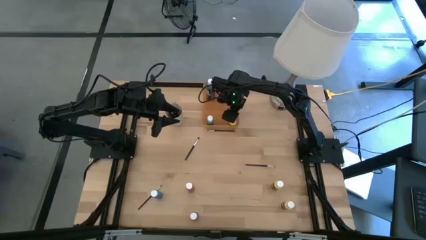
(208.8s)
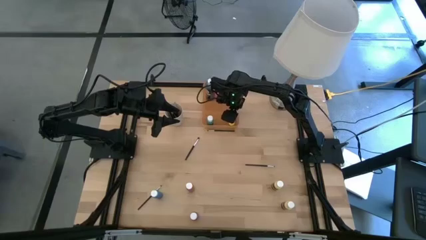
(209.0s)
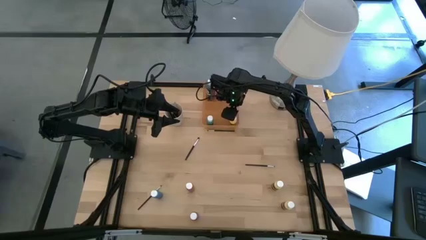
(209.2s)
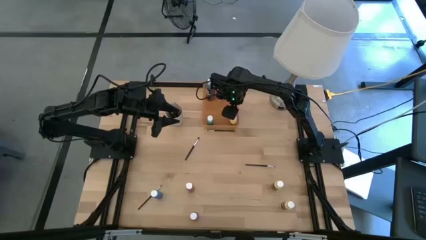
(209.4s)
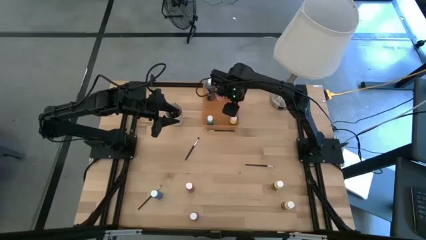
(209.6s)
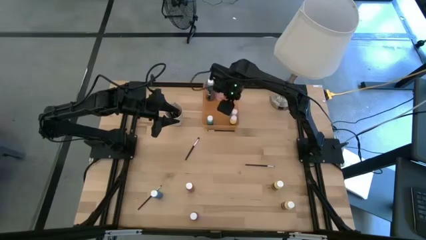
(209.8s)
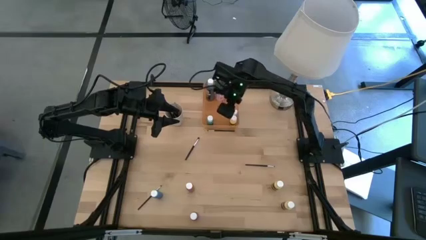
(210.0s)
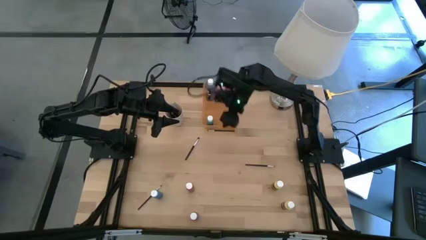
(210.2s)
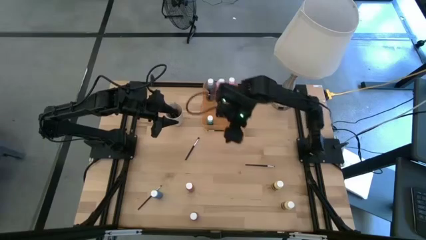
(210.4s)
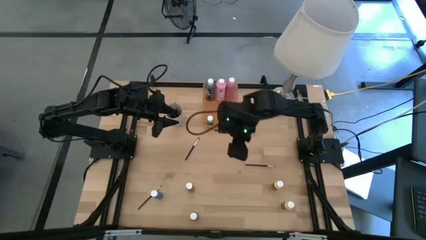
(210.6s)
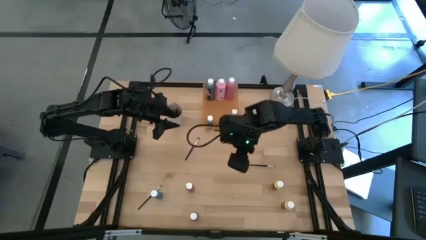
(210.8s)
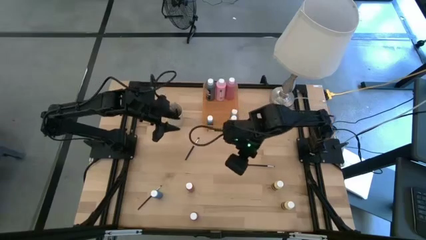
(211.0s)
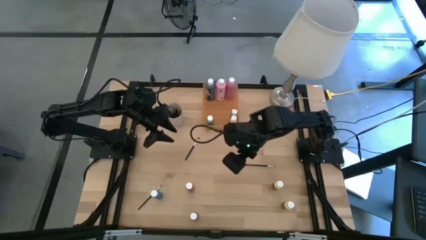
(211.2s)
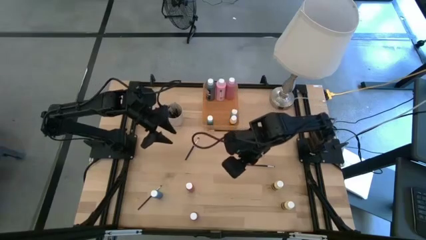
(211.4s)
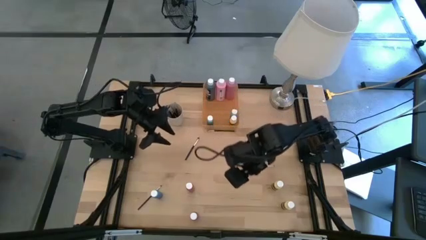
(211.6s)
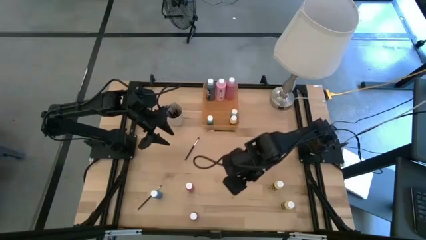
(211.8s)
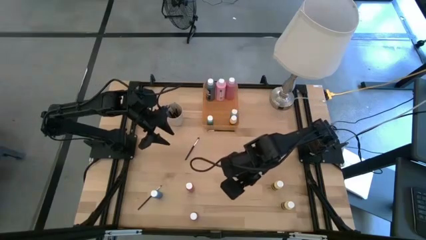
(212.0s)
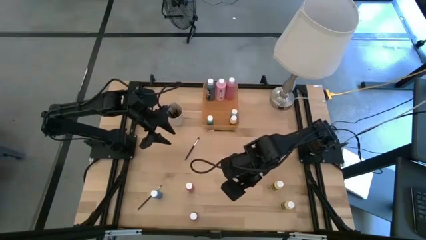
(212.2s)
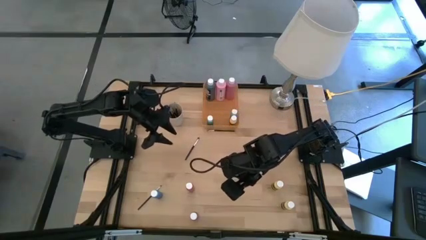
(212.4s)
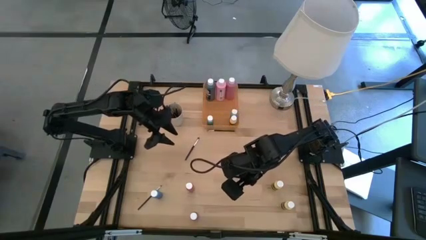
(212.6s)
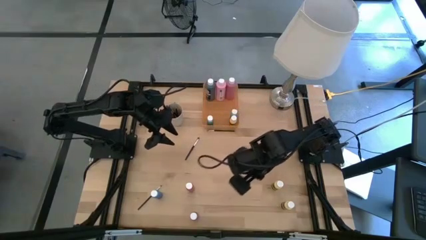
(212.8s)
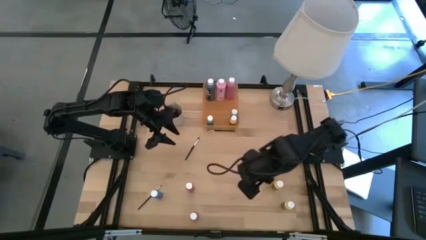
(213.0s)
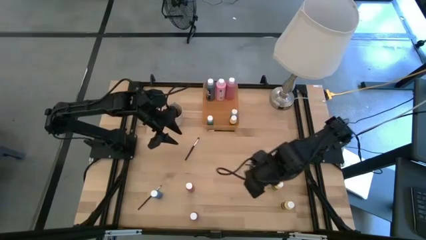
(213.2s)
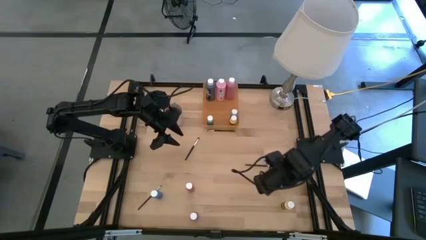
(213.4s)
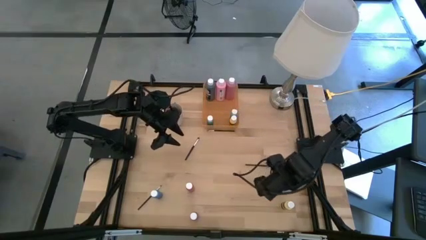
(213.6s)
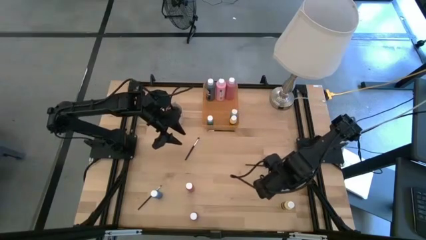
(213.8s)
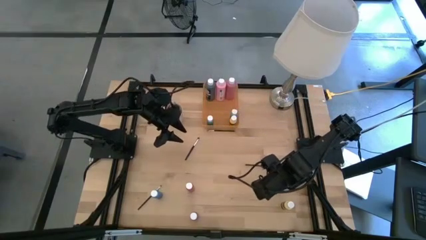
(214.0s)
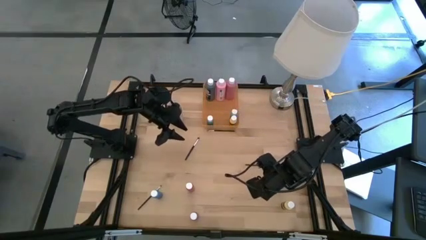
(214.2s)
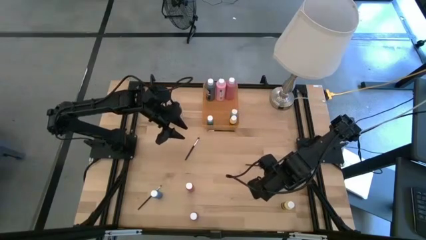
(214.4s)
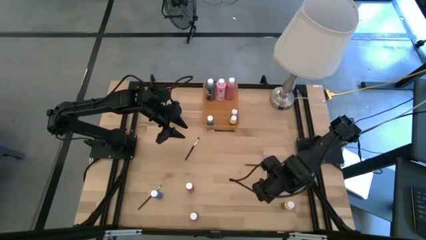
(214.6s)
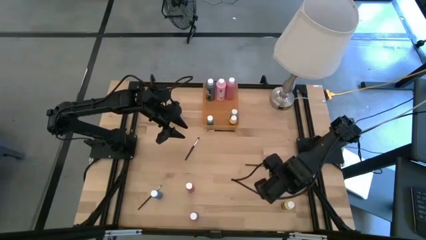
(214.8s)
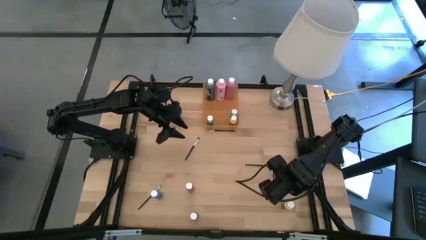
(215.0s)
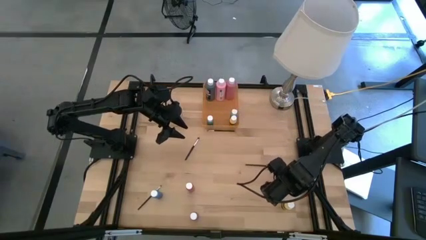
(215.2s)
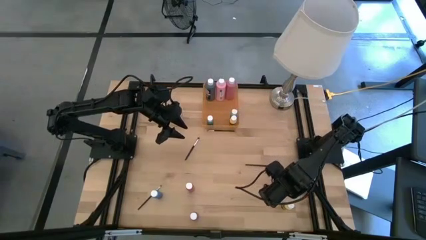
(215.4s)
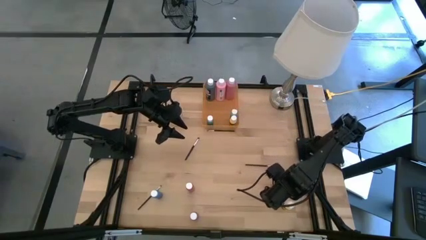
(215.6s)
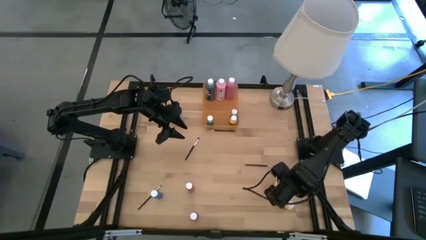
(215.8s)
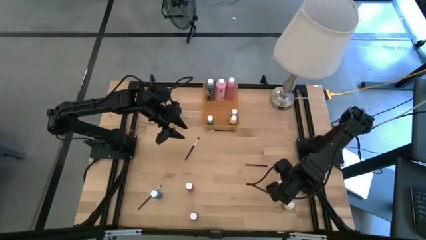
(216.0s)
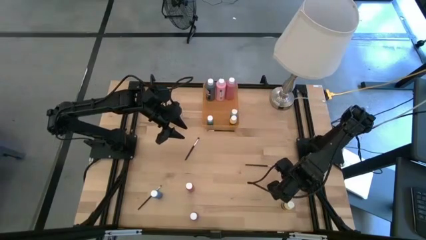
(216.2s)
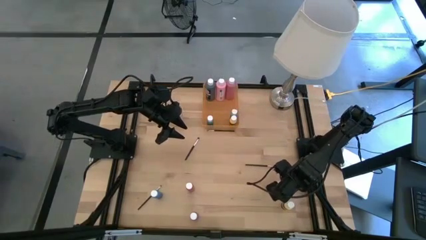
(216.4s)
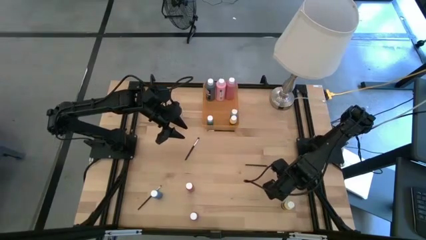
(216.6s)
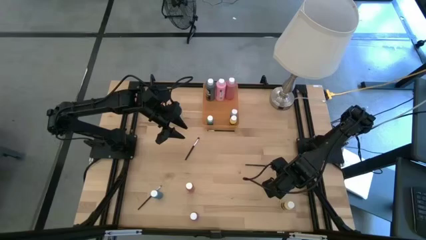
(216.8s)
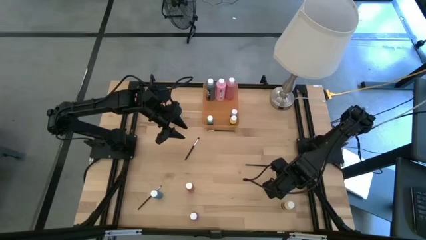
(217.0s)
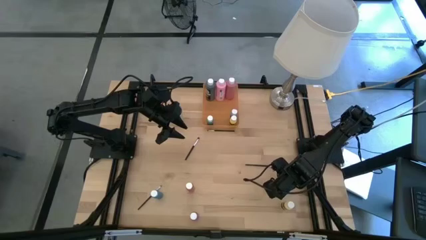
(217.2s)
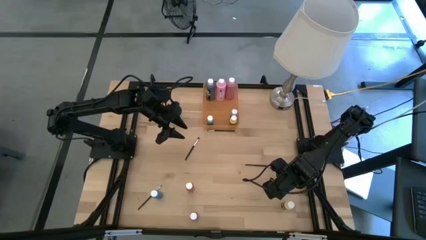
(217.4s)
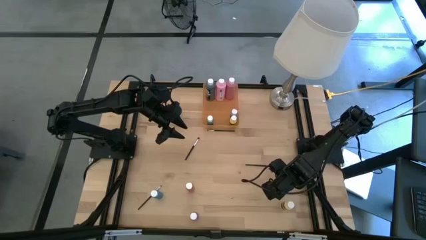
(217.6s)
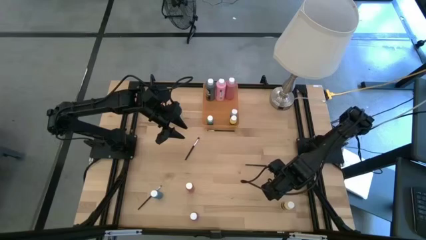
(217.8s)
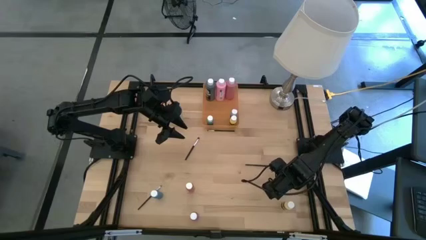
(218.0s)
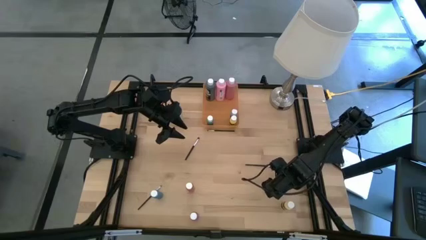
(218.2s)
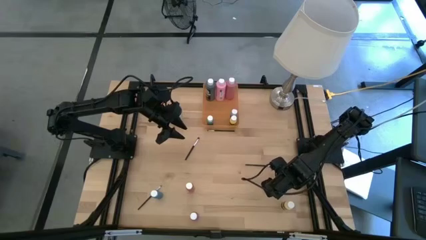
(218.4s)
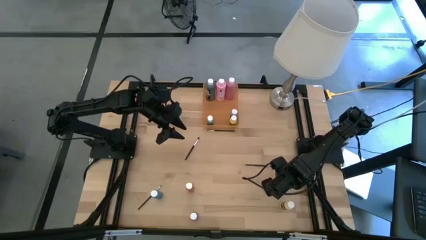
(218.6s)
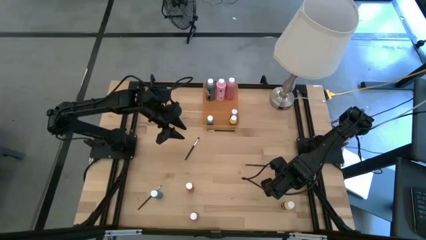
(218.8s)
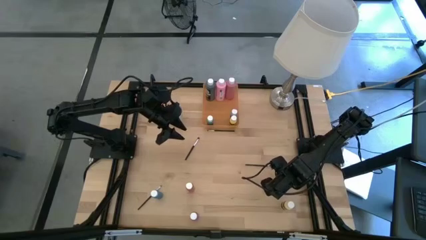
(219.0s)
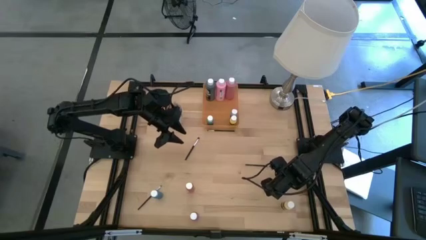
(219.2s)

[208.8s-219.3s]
Task: Pick & Place Paint Supplies
Put the yellow paint bottle into the orange bin

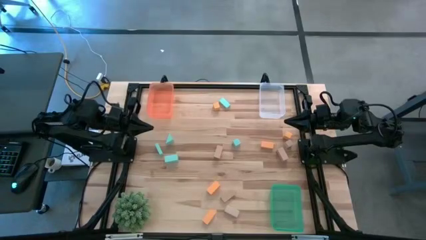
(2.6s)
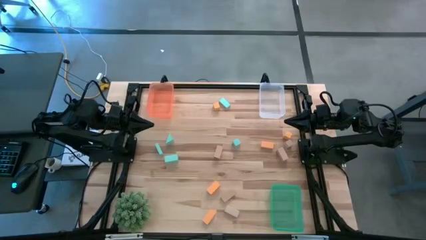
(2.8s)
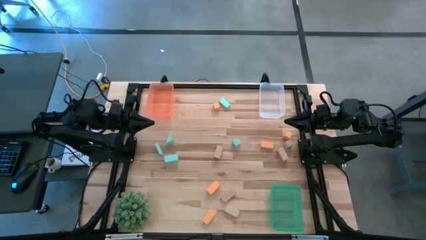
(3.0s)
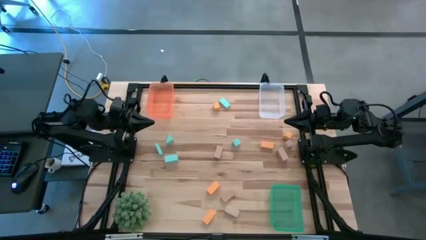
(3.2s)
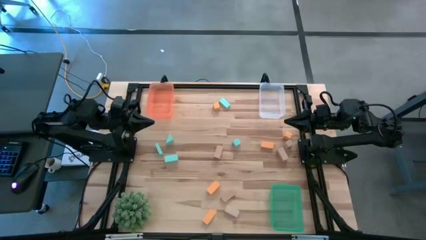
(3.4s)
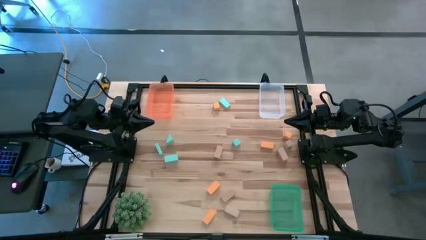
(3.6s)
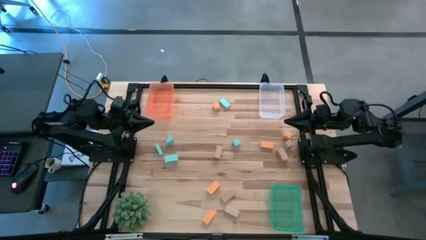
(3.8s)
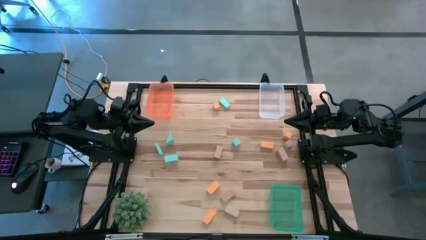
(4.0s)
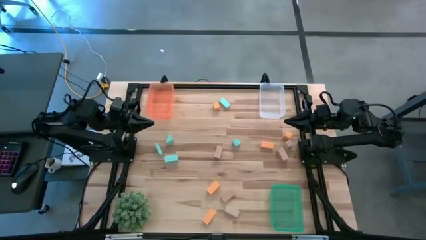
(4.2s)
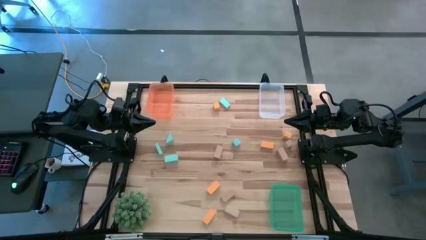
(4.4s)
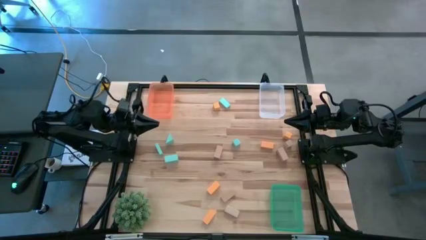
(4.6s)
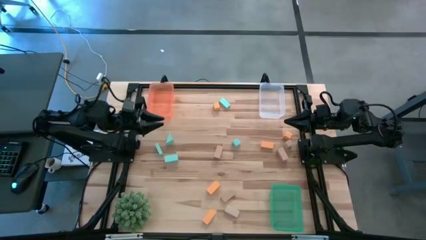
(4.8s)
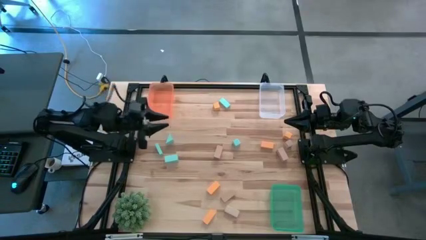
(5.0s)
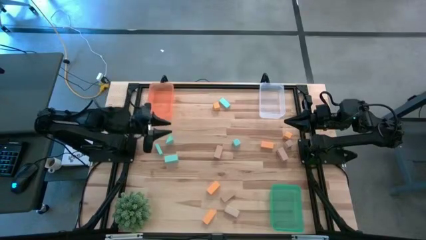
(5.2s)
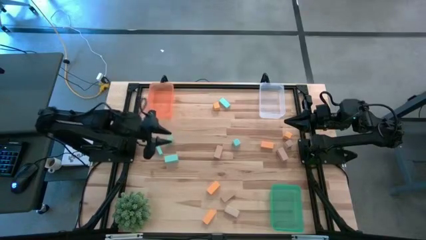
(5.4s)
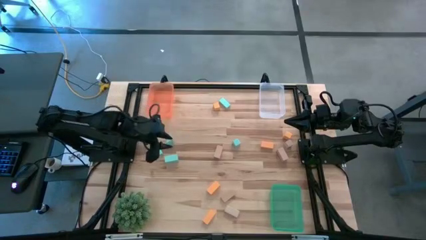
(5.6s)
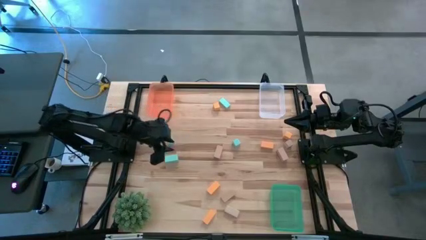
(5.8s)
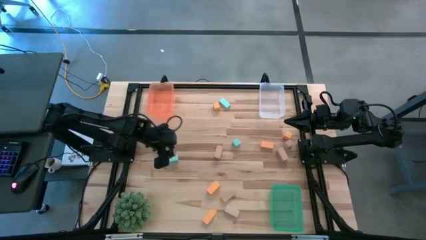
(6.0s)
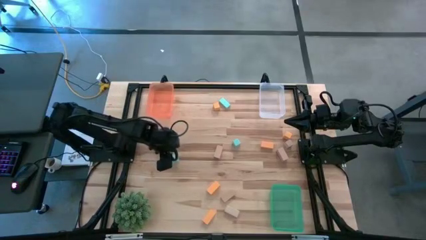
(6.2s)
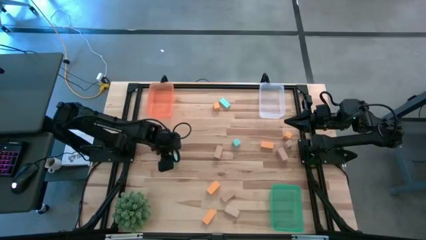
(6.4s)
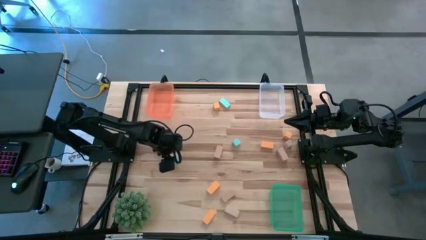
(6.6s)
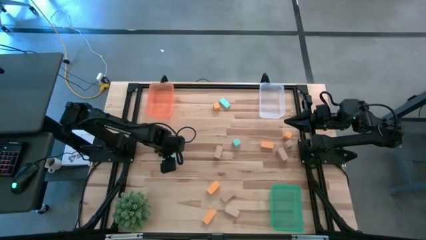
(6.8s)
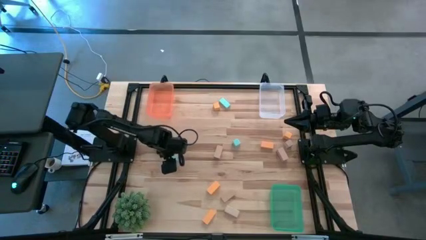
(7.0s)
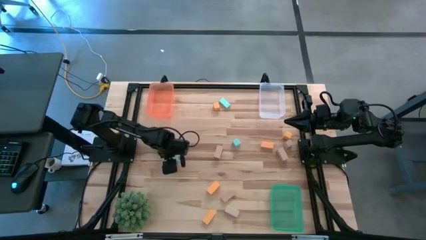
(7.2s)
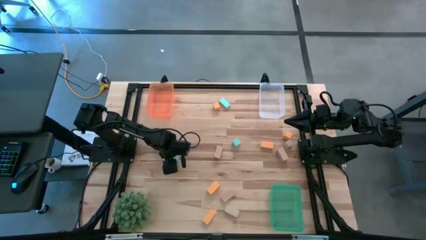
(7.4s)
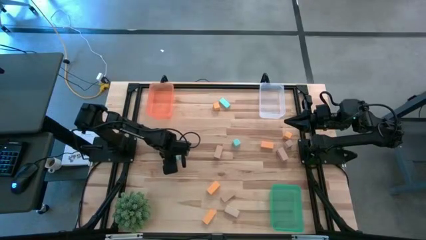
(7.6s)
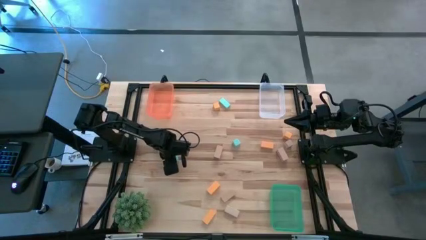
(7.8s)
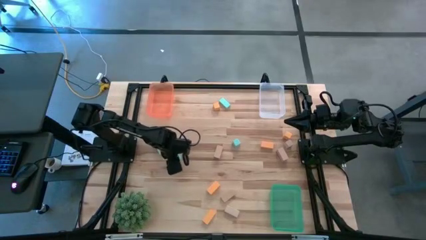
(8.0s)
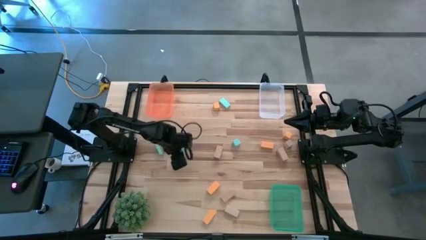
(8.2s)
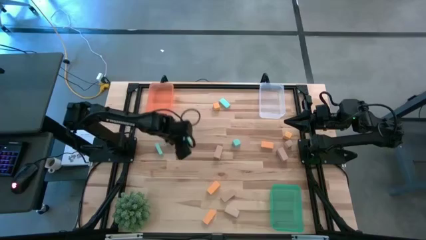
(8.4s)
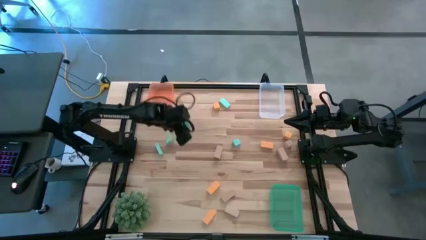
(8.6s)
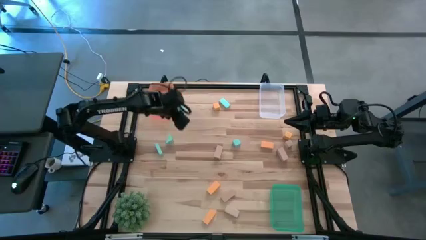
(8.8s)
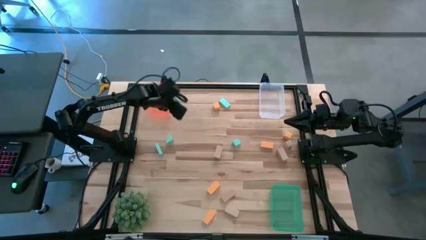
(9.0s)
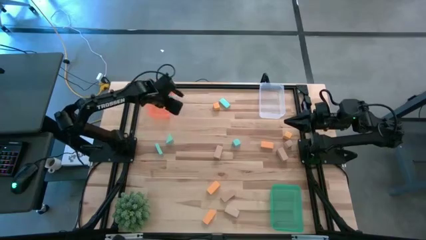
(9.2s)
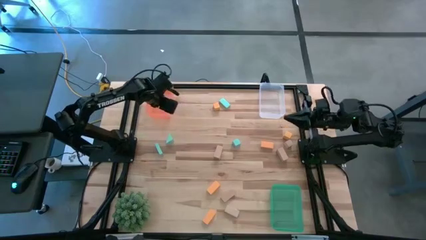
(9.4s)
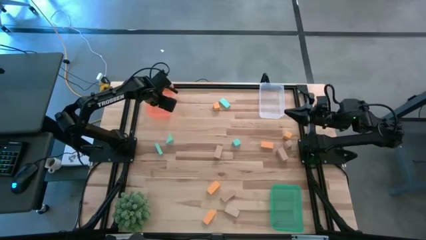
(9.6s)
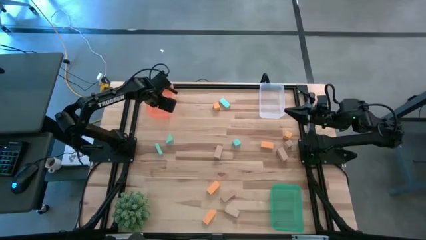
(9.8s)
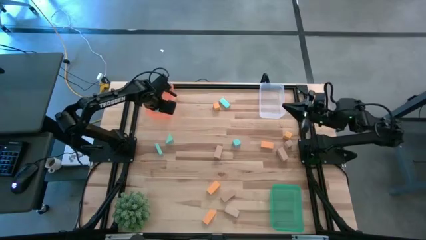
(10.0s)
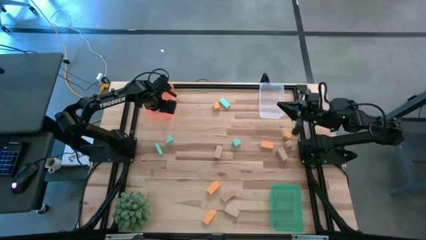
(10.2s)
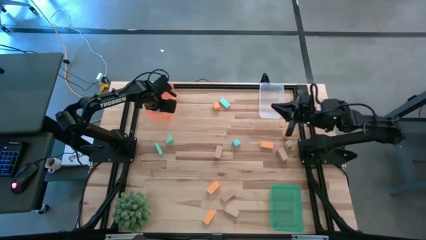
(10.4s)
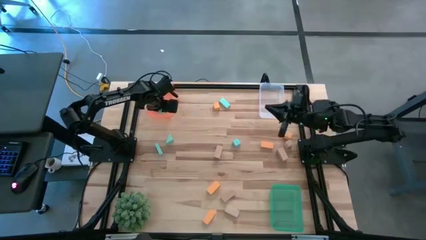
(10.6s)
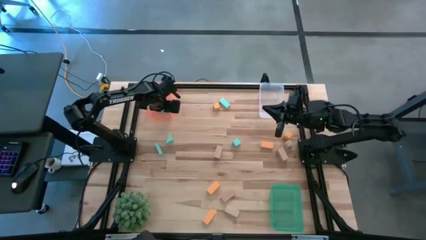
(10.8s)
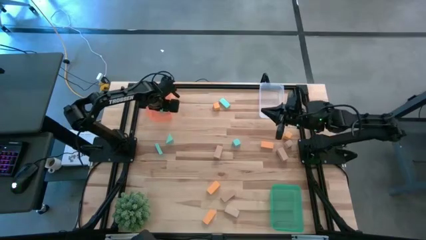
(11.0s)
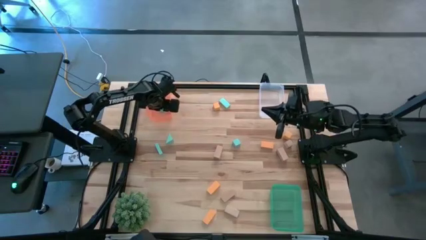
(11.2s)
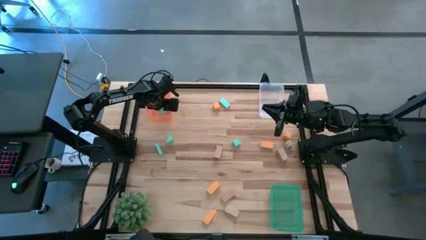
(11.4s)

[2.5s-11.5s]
Task: Sort & place blocks by color
Put the blue block into the orange bin
